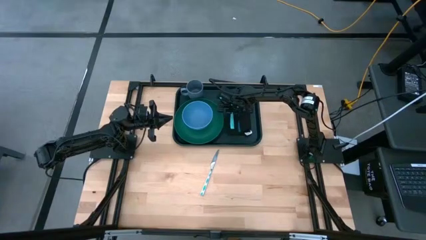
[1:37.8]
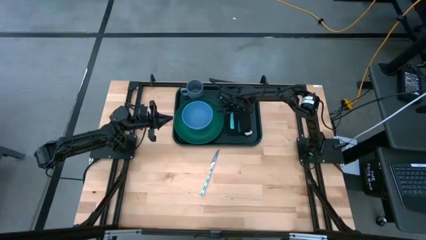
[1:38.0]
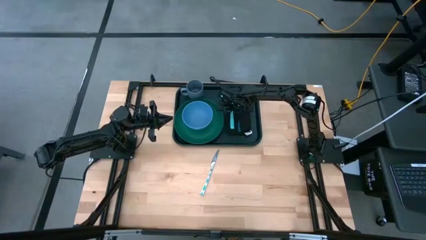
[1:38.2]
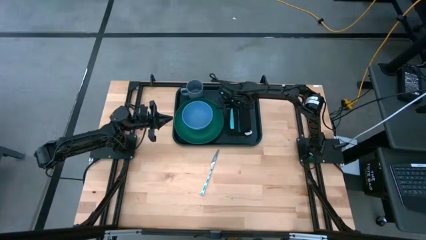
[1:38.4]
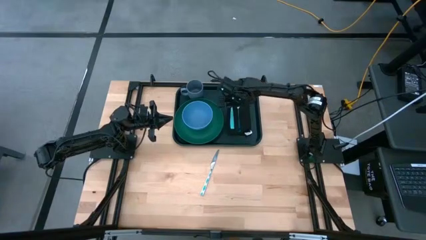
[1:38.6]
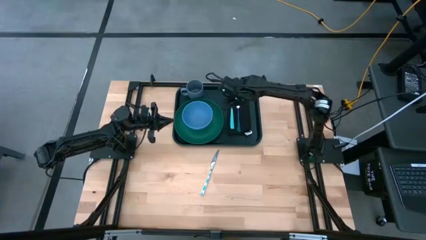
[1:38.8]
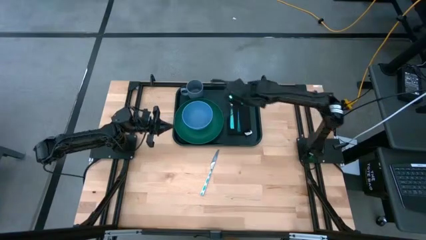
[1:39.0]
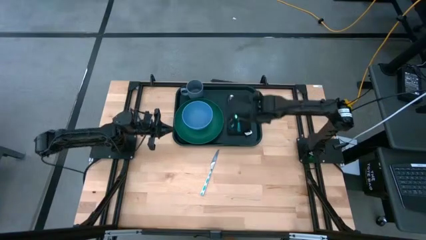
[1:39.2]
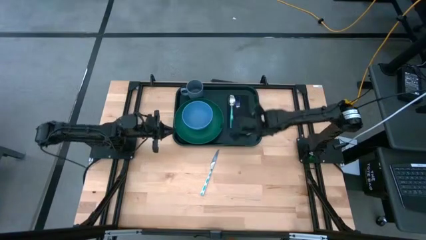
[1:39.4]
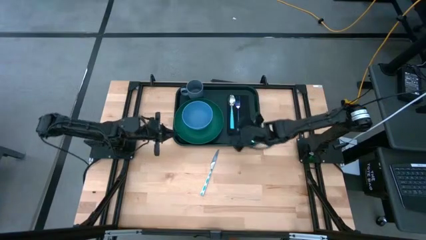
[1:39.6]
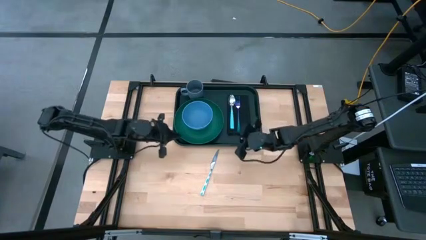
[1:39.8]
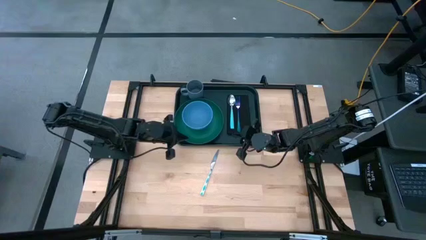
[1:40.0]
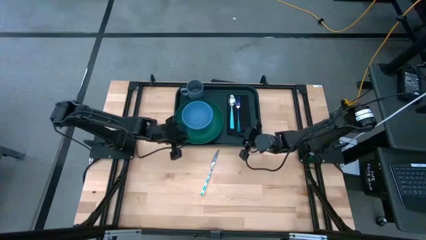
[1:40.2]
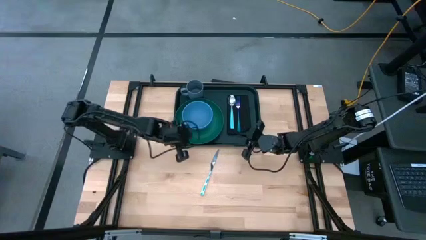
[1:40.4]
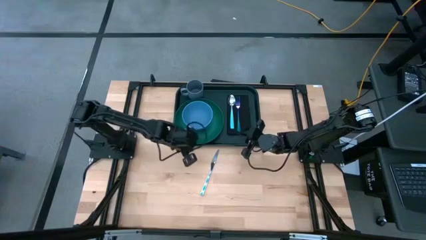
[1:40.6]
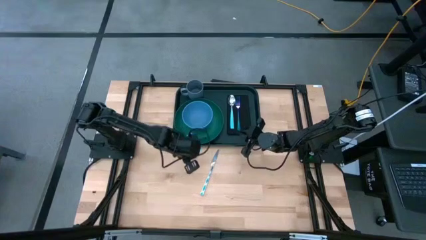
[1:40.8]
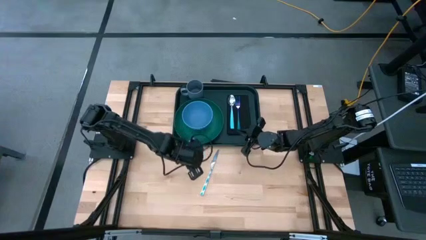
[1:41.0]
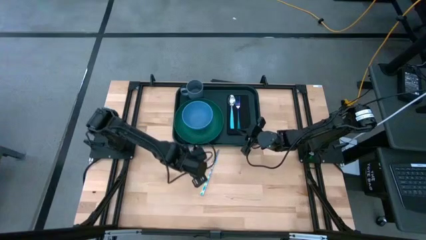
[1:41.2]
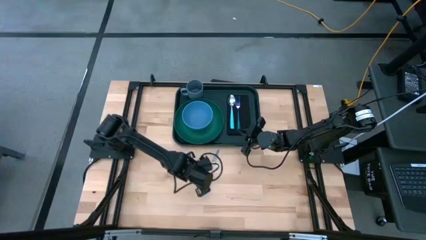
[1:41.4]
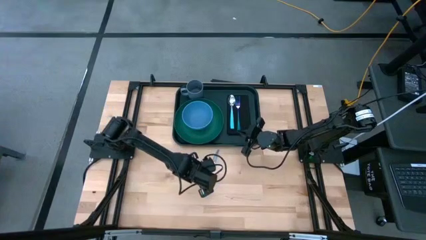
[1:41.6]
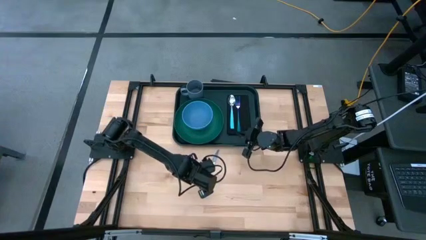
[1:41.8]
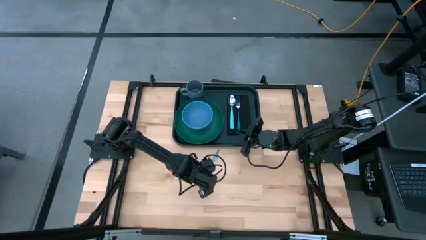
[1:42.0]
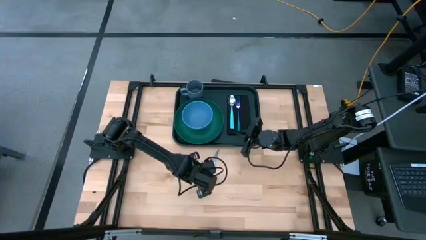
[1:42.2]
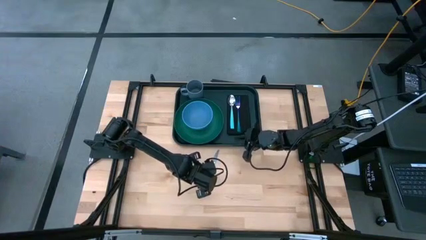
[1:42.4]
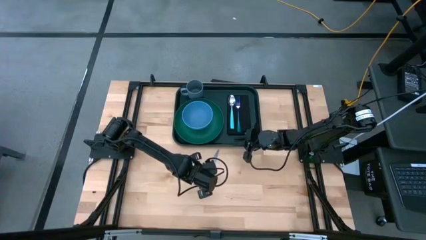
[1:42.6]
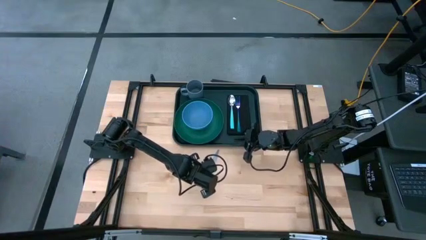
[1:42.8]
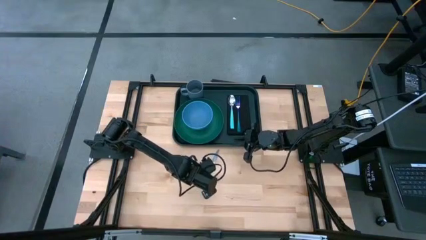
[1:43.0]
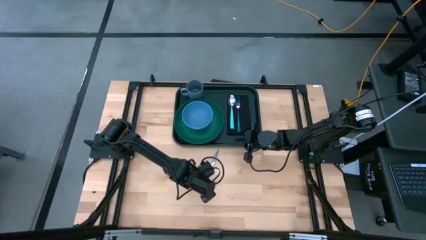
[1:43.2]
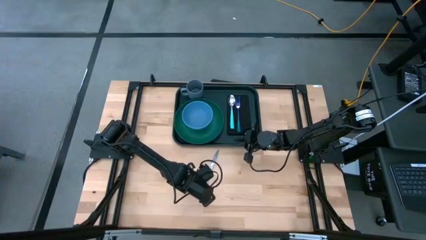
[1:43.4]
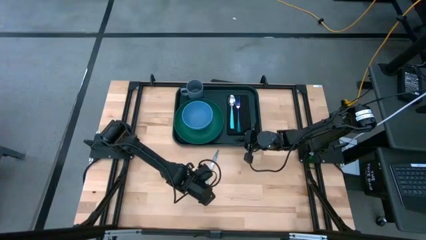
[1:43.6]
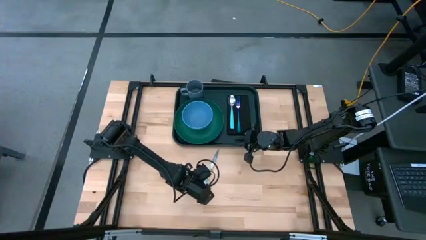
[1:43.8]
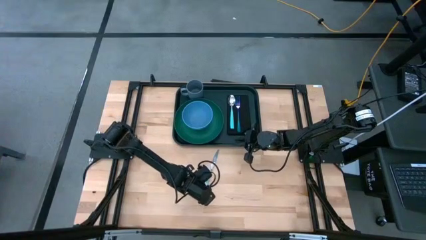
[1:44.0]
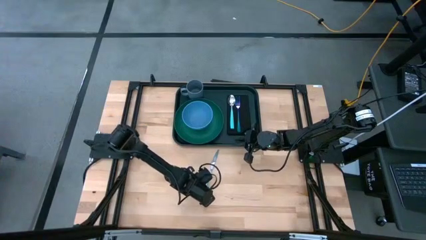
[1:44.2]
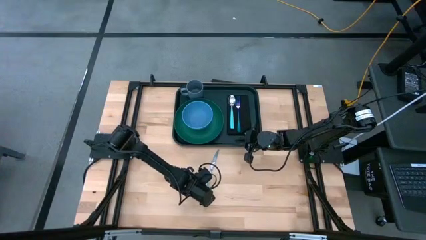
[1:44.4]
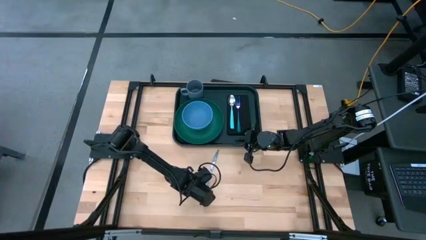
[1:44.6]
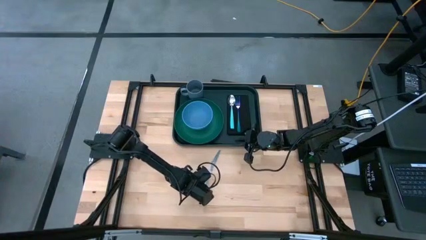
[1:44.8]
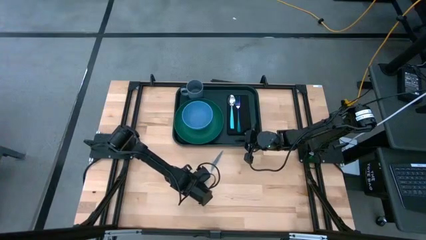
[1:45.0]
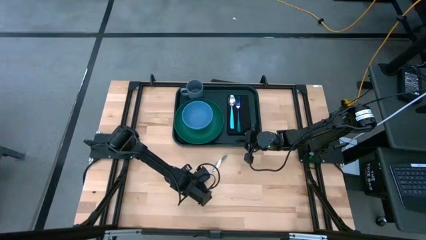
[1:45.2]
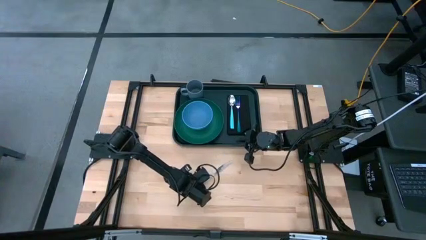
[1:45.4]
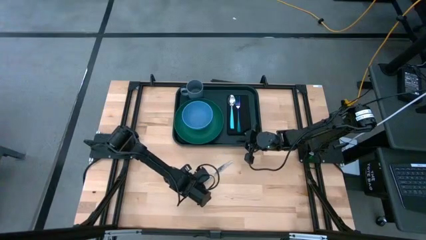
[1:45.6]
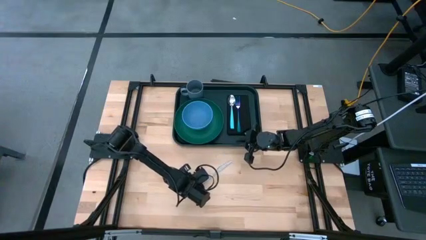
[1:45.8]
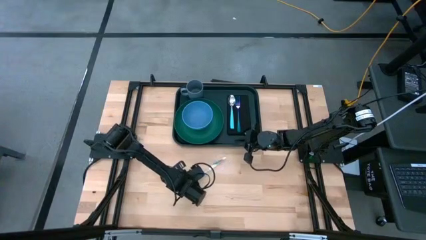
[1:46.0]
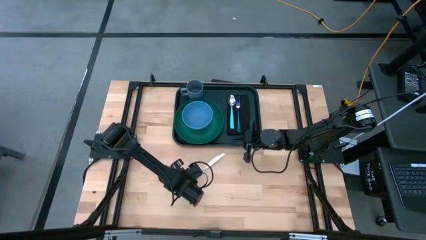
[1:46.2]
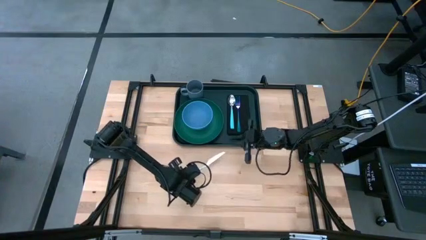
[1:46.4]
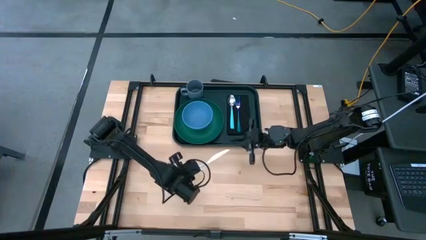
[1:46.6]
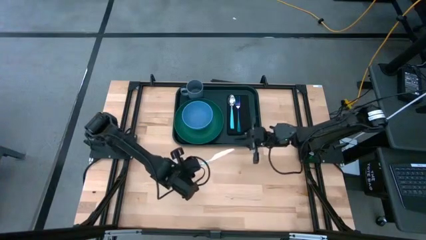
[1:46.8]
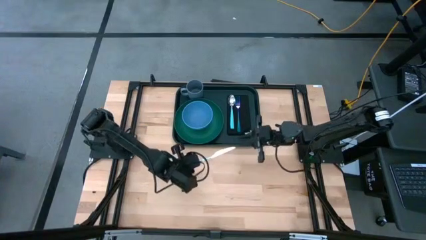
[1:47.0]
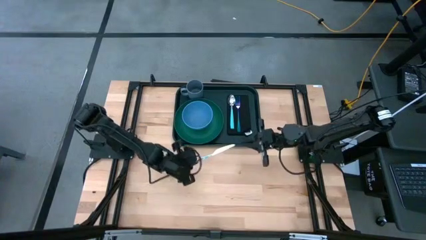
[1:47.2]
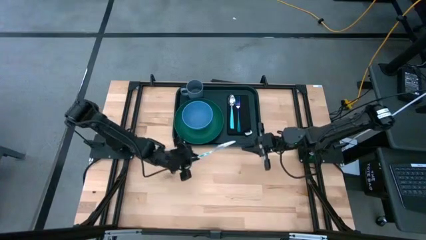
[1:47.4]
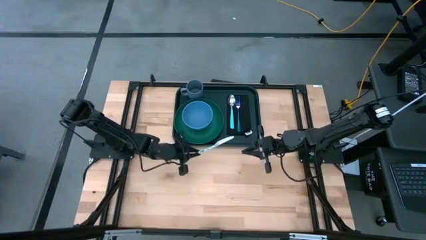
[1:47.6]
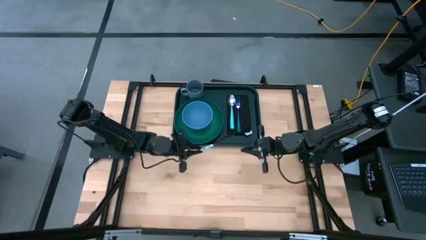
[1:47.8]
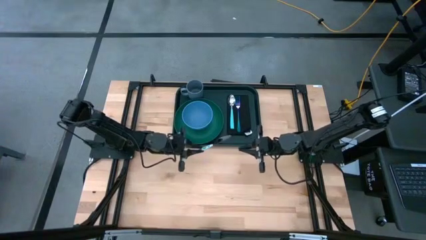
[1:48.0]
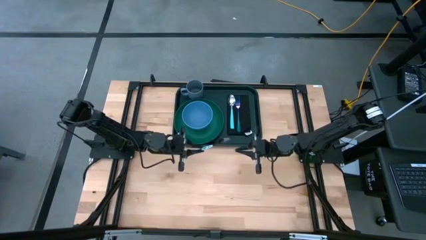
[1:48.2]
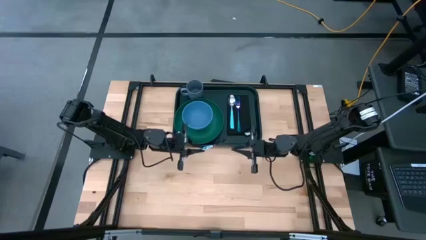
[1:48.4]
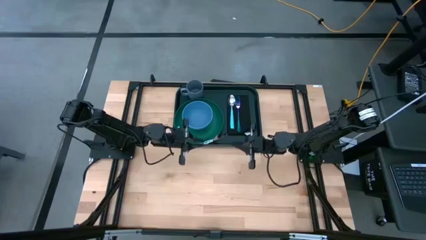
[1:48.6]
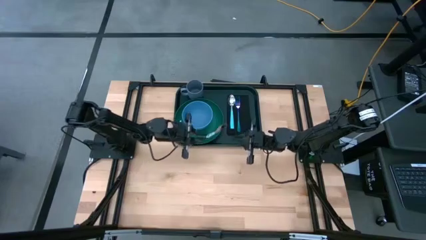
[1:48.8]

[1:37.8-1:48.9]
Task: Set up tray
Put the blue knife on top of the black napkin on the green tray

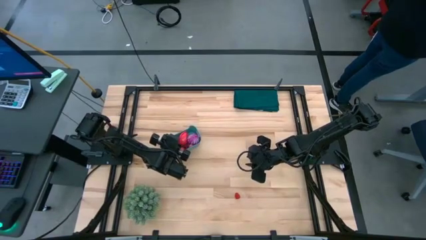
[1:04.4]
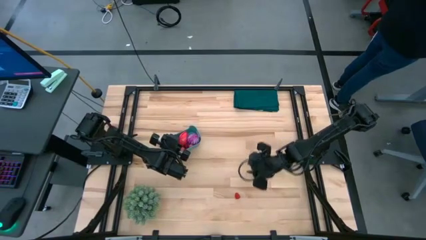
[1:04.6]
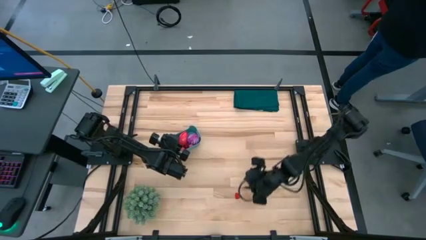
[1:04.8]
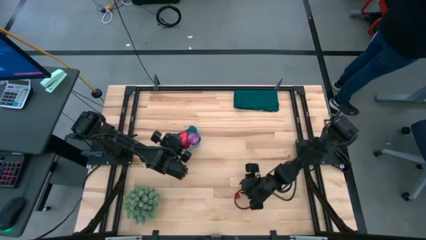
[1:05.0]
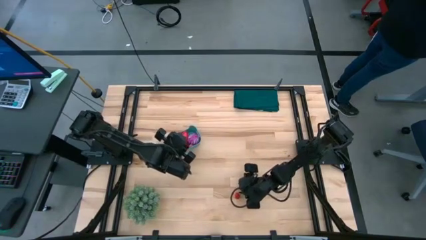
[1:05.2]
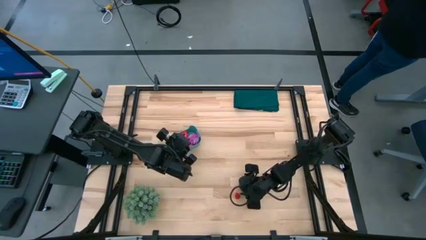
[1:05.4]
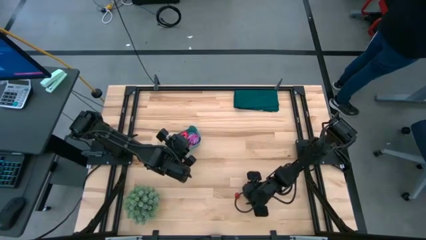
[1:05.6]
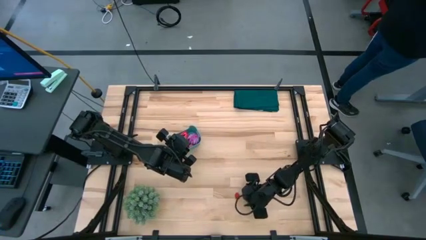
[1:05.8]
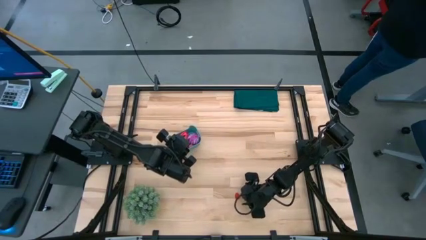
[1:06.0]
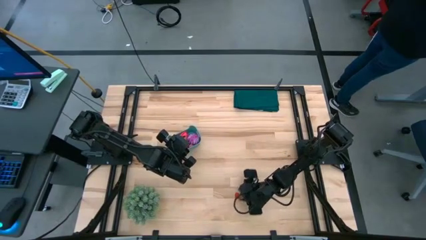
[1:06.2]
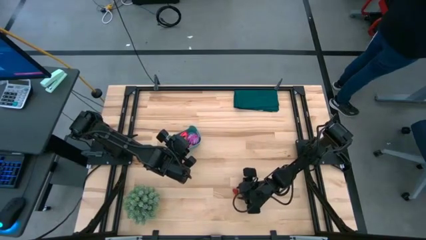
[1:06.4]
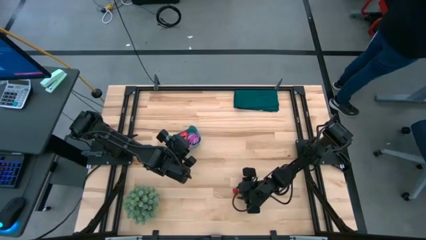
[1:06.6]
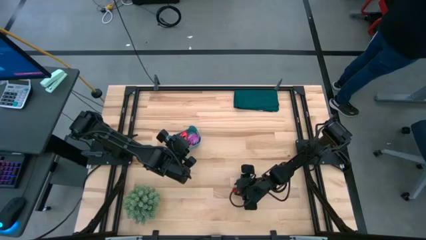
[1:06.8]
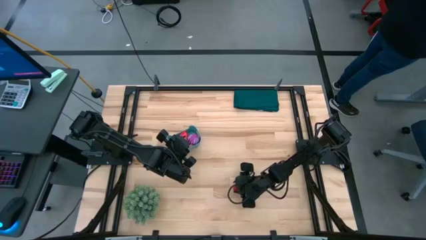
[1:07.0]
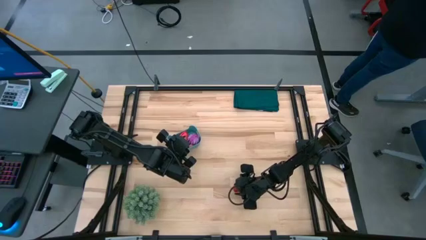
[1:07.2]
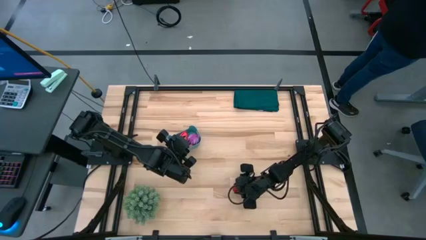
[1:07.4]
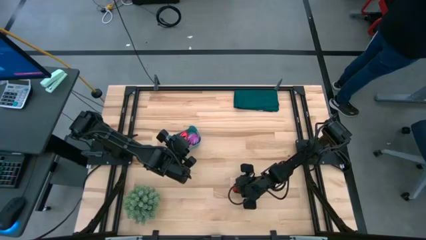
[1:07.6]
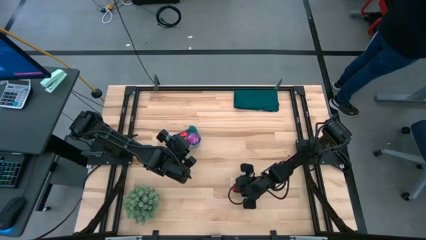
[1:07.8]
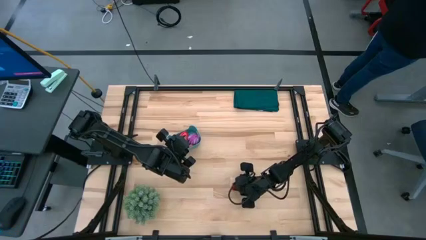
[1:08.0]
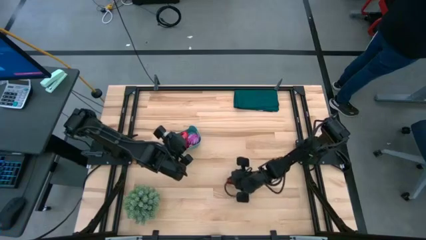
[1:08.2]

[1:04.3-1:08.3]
Task: Pick and placing Produce into tupperware
Put the red raspberry into the blue bin

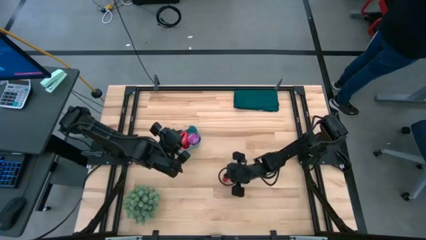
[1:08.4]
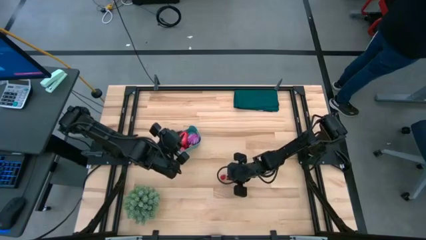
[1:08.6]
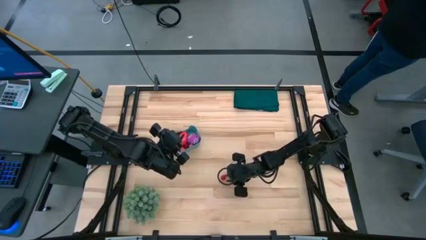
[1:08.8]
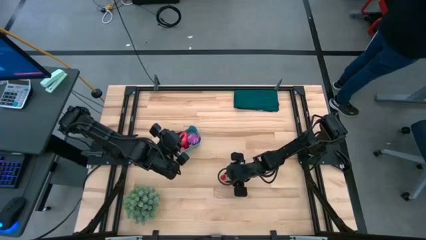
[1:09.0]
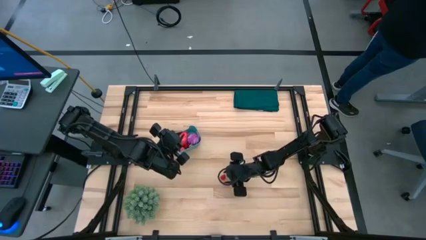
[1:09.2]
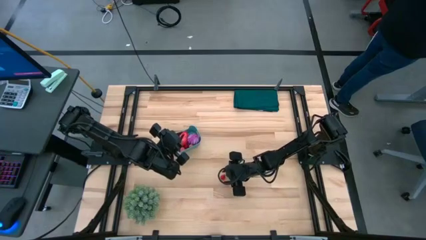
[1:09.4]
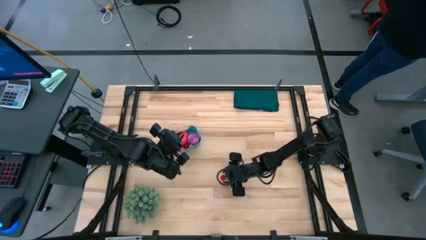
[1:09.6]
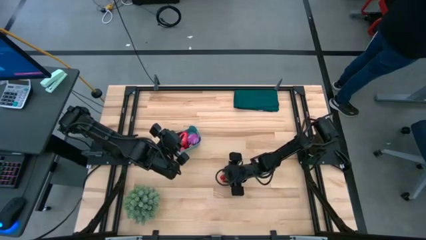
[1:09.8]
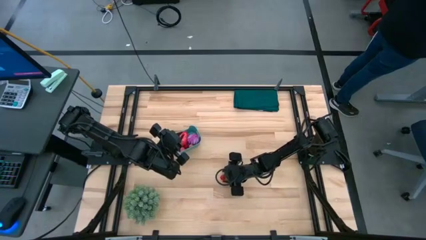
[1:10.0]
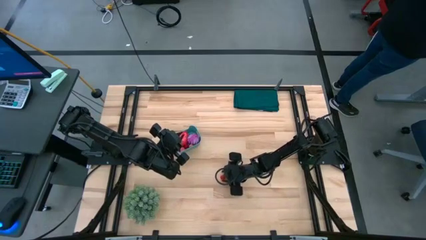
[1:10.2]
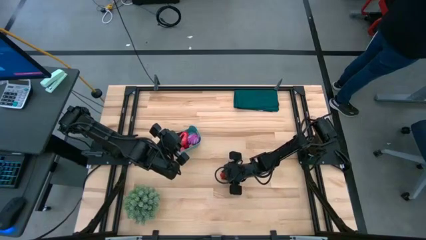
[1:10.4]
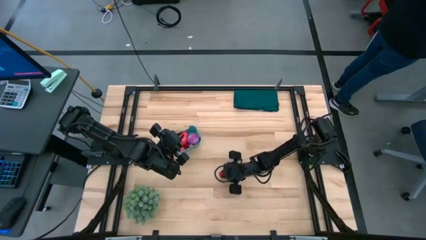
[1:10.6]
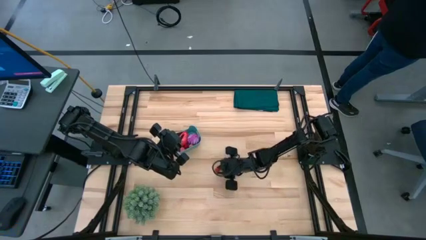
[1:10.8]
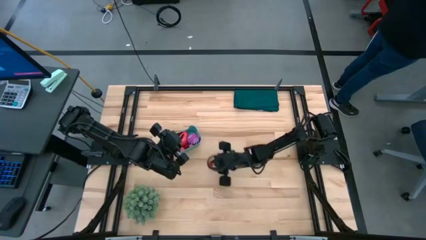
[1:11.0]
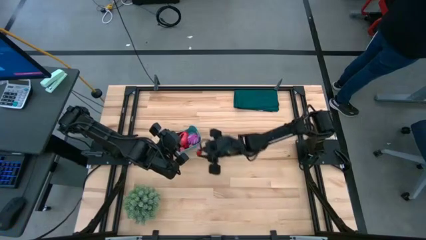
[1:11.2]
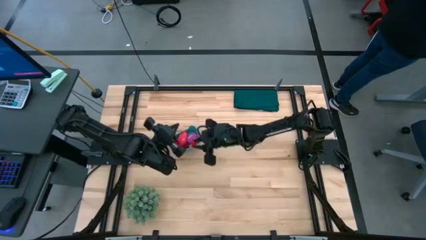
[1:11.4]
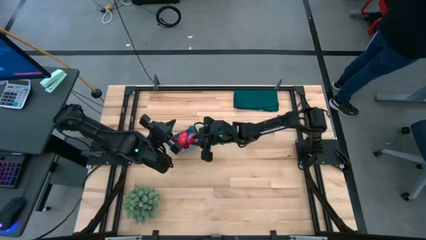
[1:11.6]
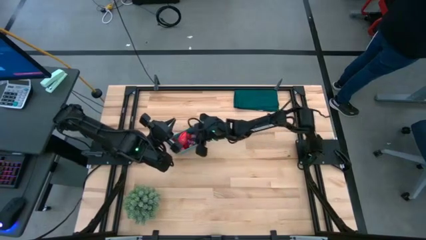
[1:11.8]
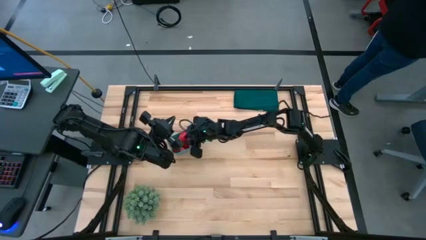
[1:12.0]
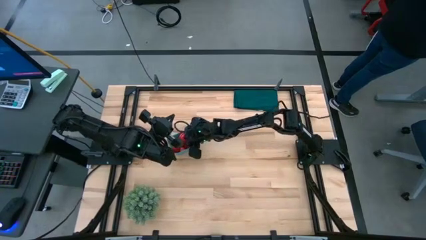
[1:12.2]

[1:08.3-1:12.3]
Put the red raspberry into the blue bin
